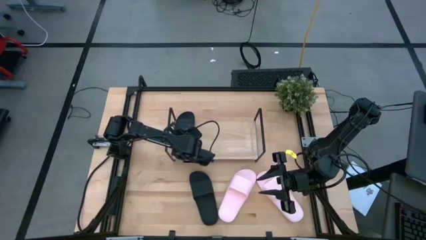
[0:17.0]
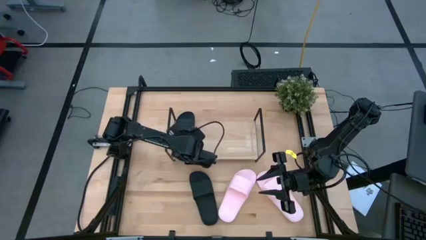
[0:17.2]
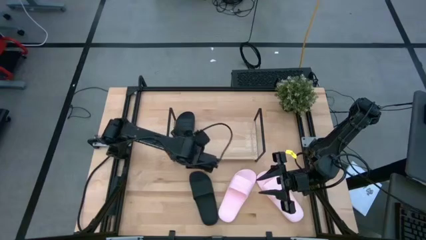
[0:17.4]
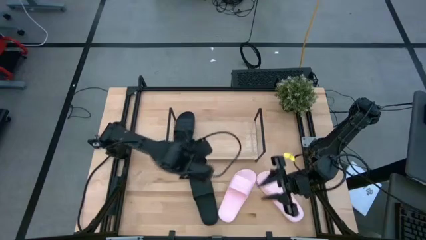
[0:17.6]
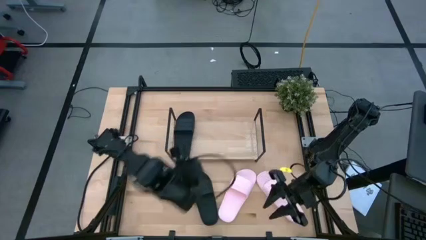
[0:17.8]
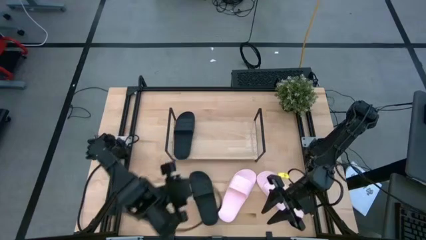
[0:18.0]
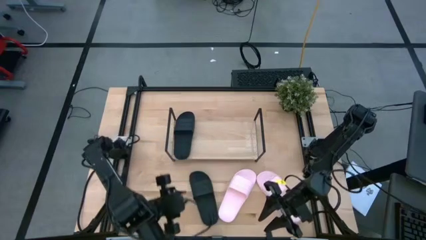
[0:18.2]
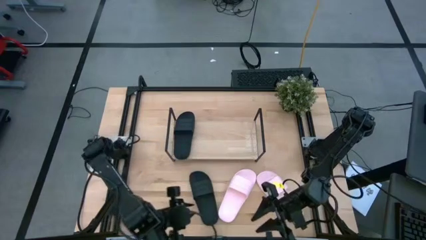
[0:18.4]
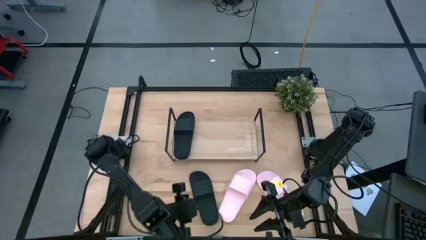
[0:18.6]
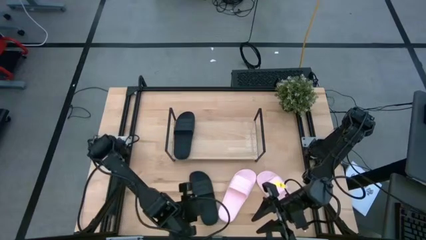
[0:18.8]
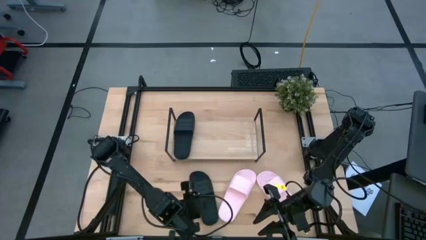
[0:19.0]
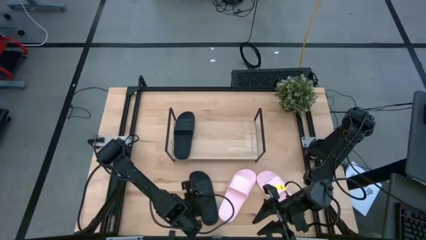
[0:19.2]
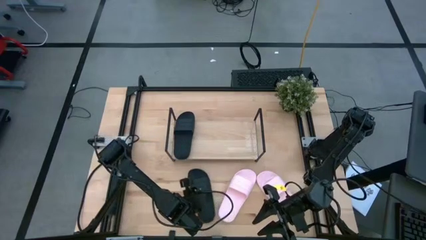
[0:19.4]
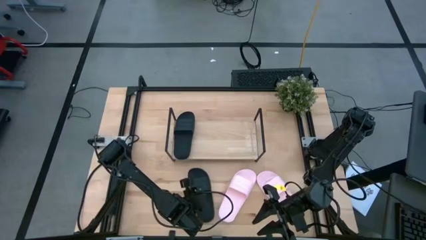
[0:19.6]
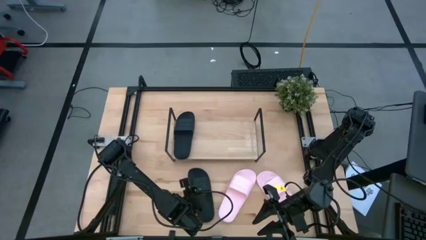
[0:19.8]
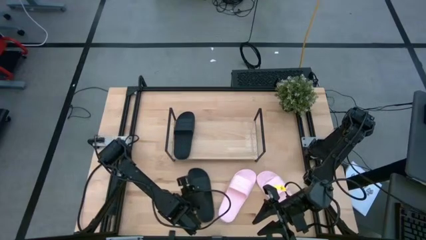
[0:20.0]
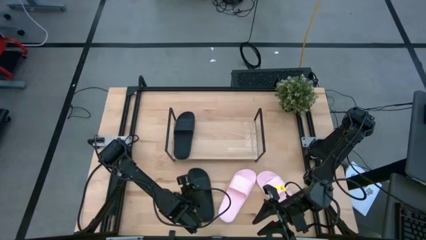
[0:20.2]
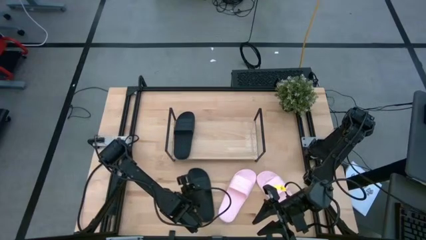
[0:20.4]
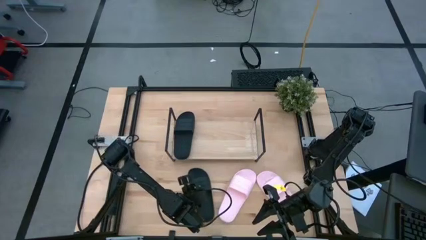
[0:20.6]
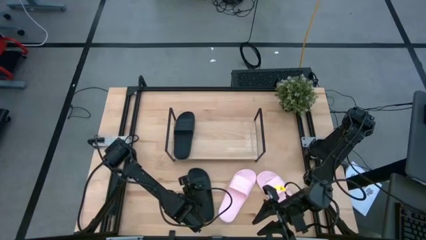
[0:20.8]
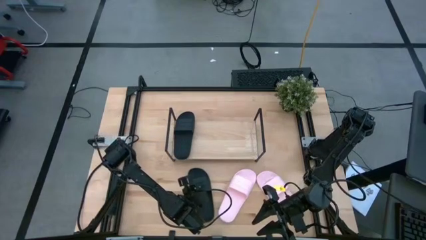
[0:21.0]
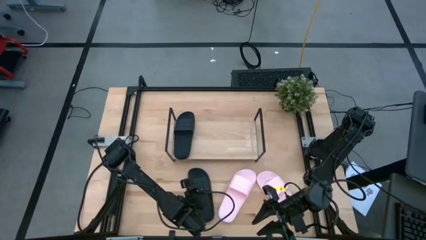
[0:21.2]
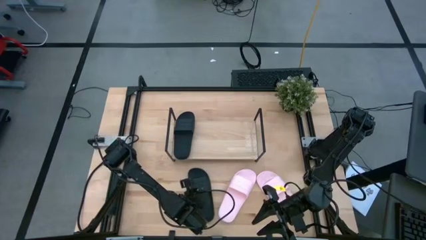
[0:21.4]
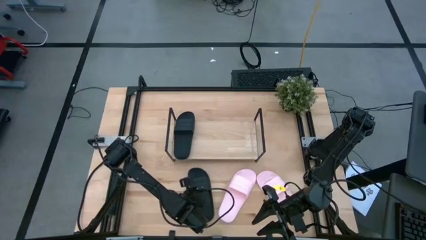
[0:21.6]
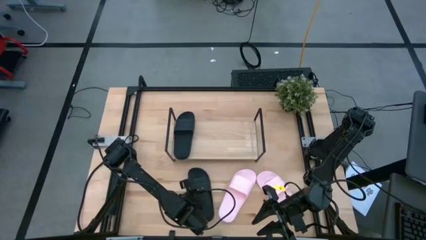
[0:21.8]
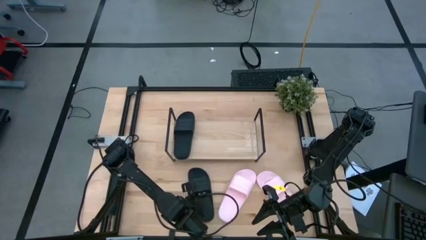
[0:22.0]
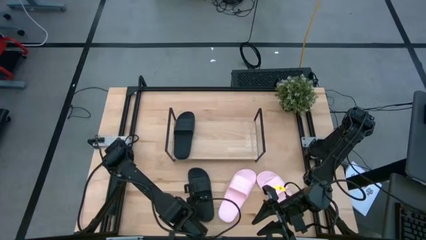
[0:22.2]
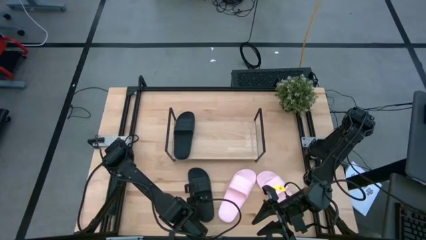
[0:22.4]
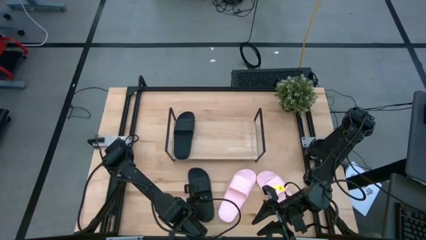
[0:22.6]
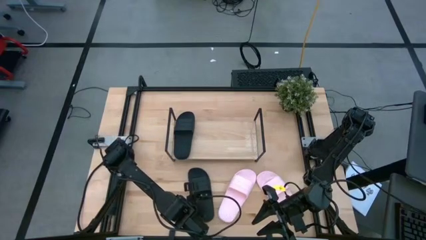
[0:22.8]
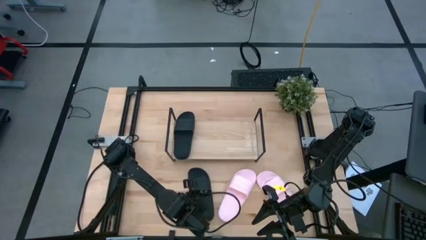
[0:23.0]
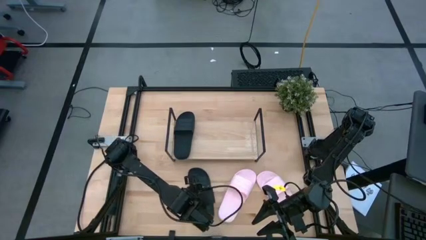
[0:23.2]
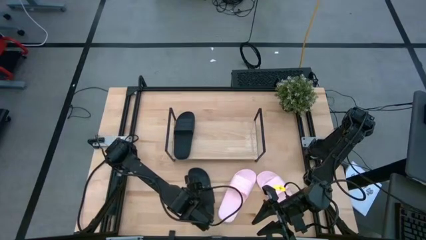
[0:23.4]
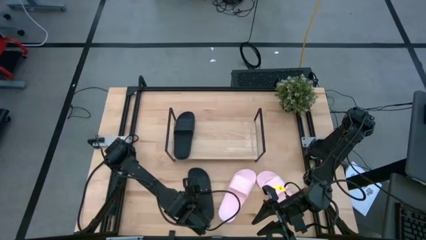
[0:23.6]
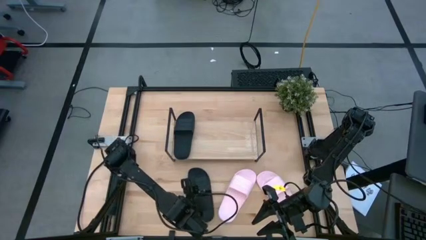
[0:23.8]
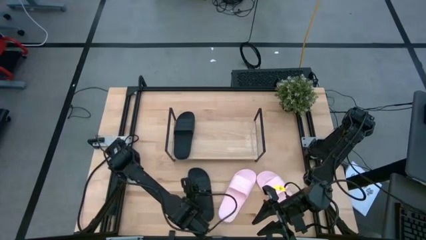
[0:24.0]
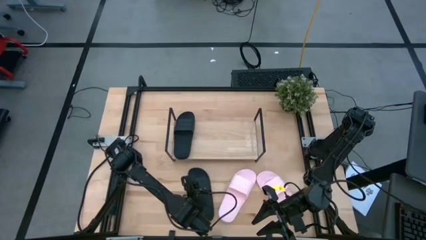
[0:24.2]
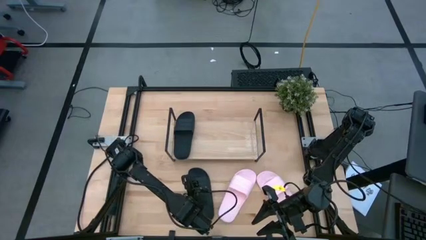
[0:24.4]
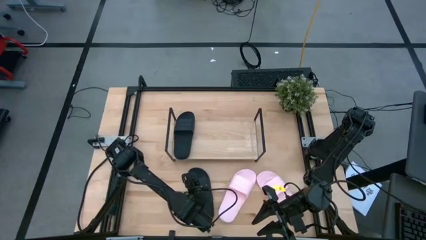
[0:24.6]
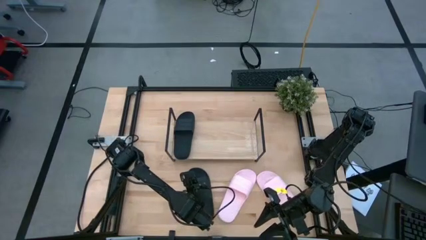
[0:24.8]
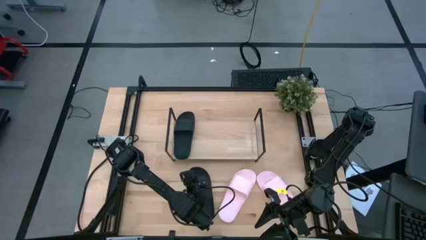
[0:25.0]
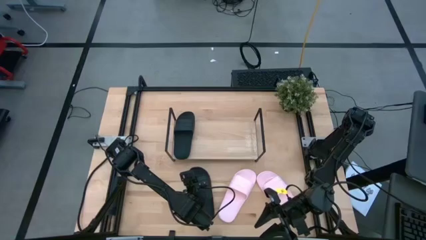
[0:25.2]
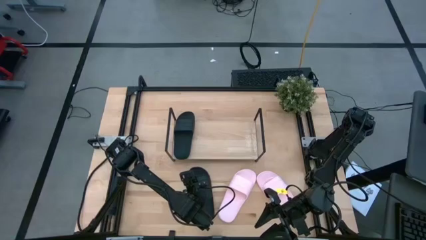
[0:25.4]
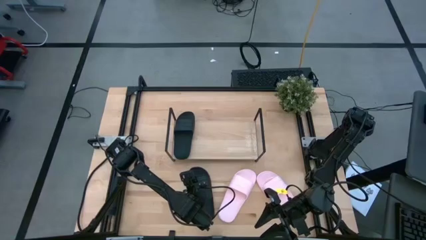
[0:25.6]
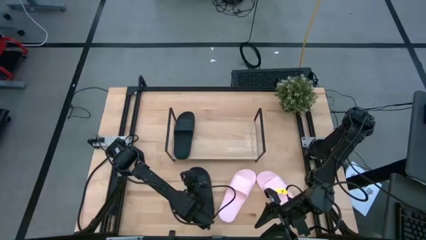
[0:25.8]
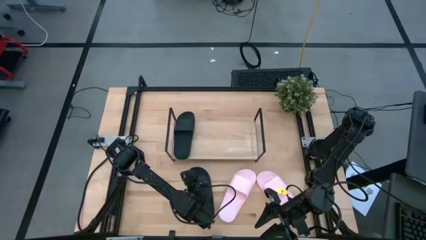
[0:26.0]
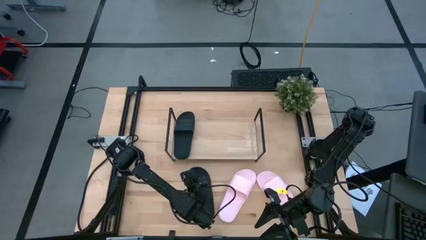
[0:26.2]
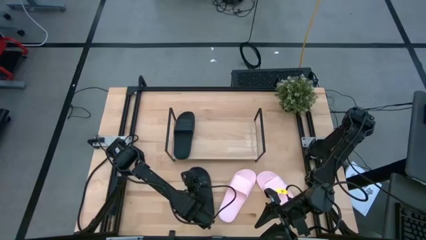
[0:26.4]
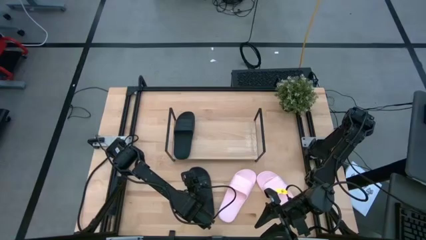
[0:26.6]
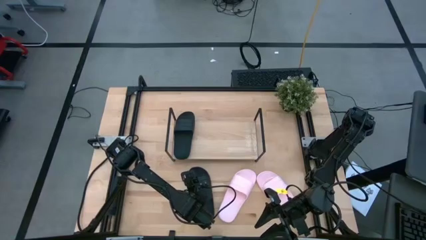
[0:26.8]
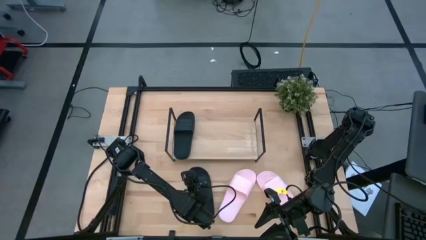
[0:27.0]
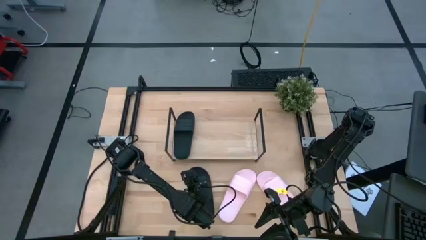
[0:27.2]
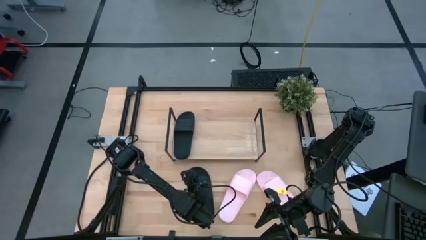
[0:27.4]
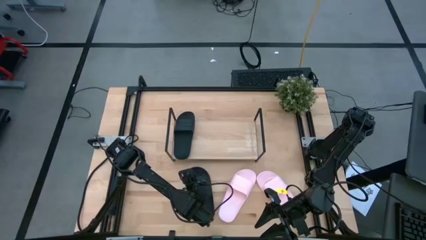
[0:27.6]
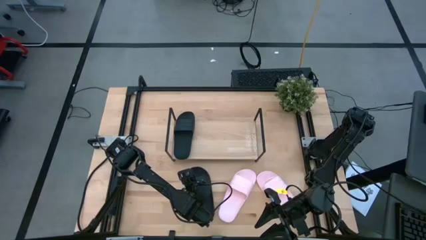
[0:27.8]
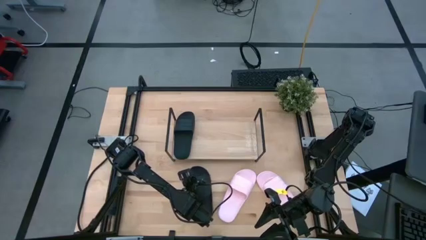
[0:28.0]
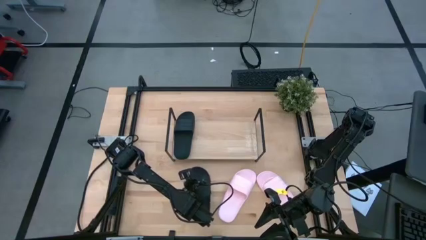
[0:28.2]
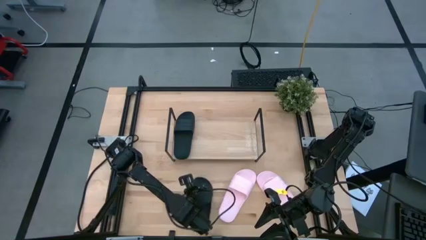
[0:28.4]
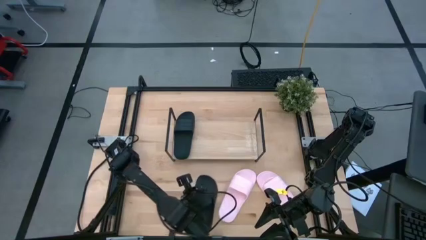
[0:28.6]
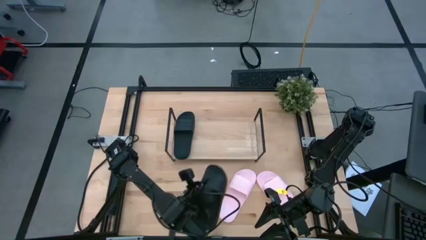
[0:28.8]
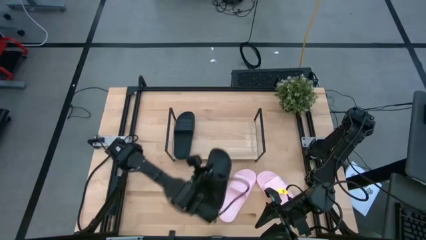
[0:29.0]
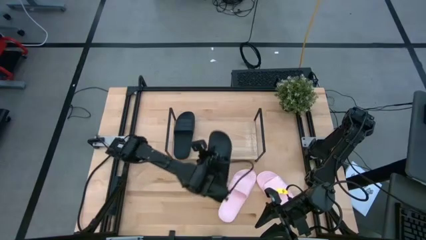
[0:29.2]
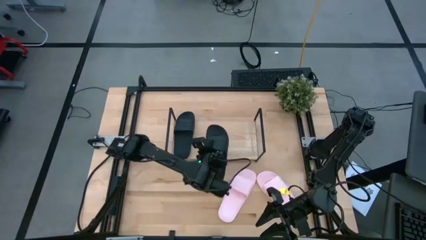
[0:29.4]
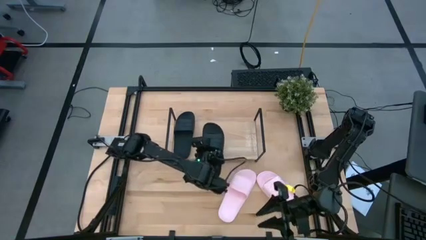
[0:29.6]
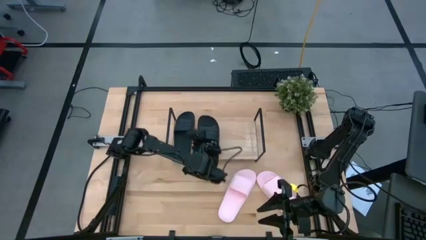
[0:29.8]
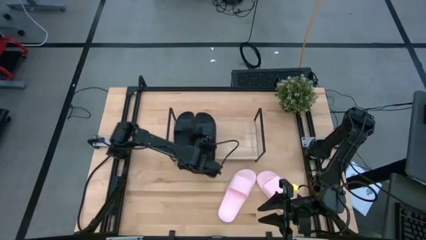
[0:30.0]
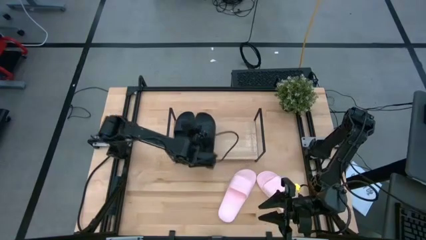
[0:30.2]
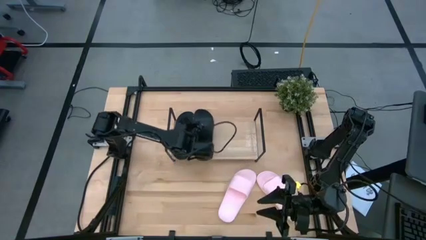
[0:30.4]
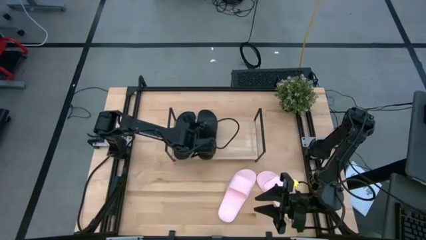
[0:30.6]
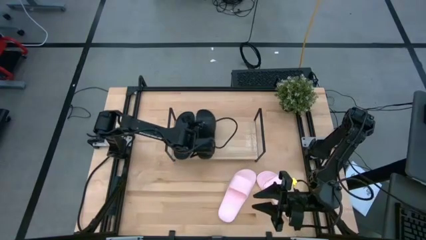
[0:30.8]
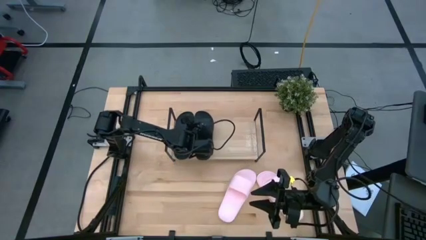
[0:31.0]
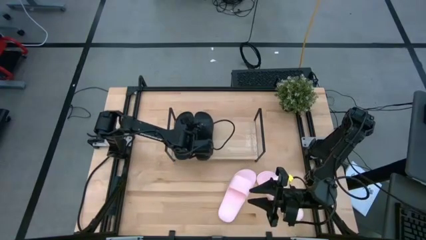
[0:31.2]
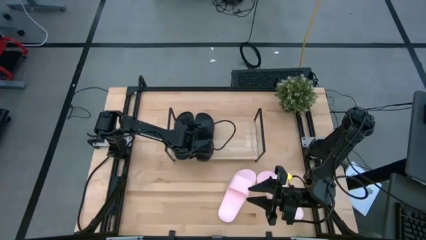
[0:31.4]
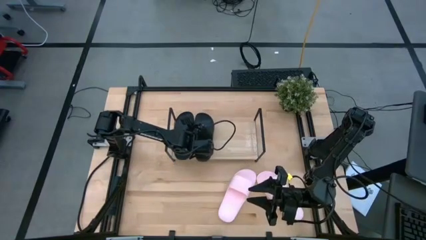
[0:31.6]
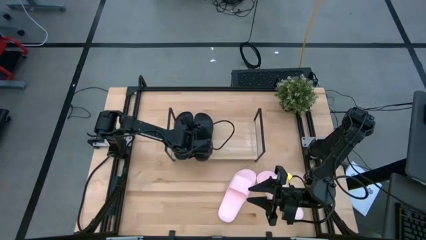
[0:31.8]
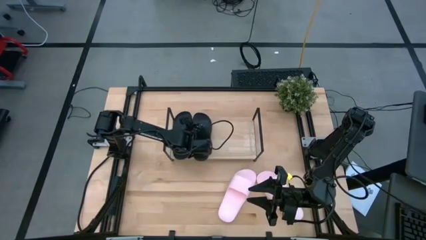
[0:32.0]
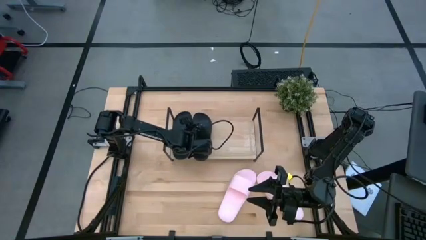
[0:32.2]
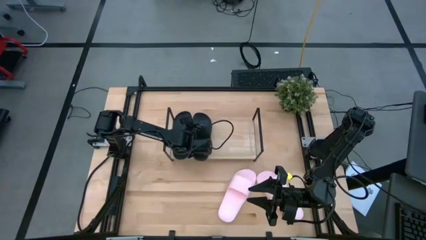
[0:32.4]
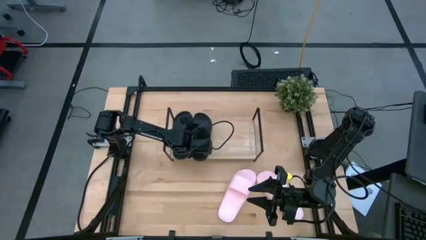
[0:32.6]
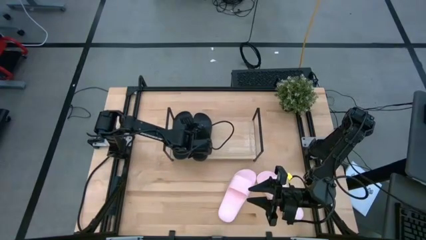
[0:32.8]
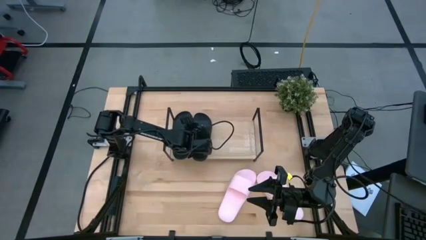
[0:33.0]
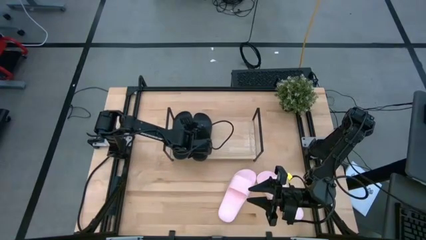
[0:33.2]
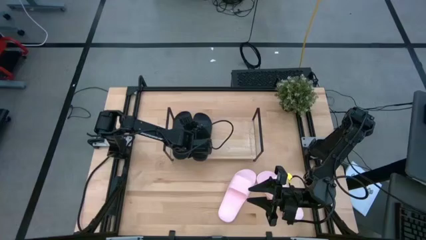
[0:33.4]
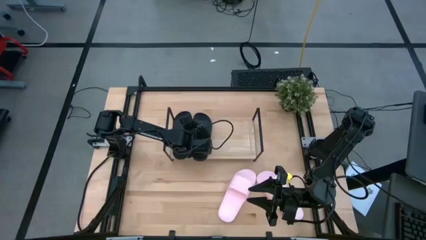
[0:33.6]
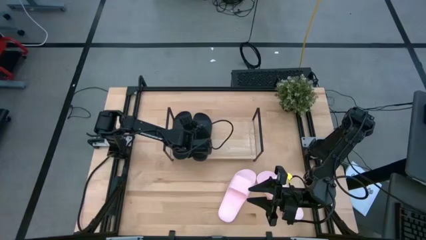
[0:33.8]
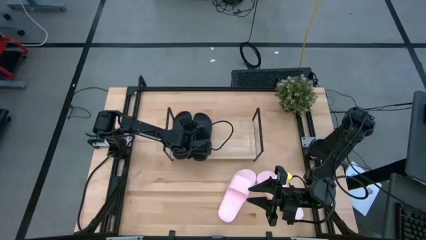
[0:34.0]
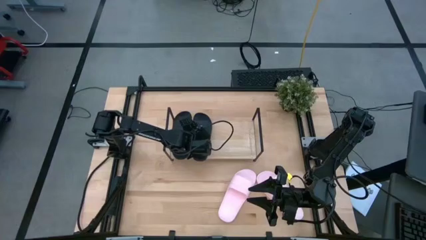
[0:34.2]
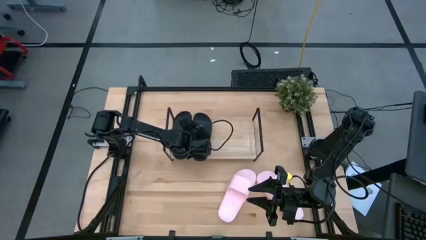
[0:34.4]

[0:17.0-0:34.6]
Task: Pick and place slides into the shelf
Put the black slipper on the shelf
